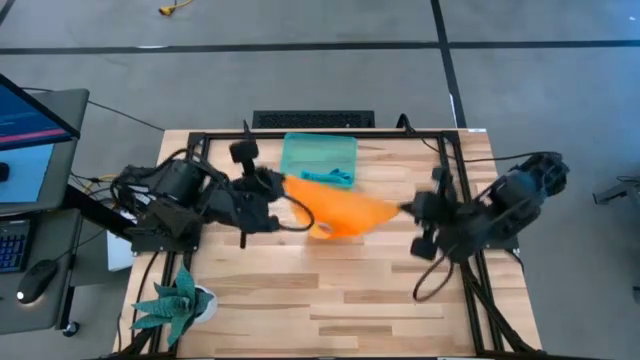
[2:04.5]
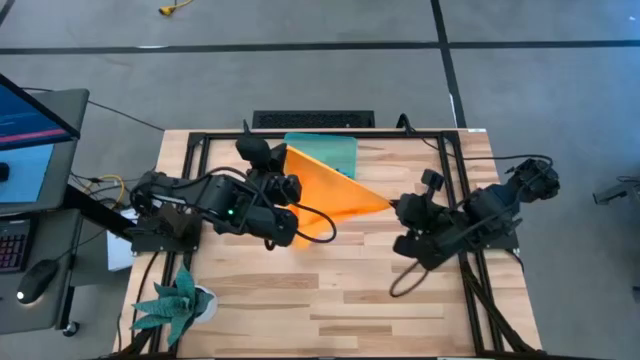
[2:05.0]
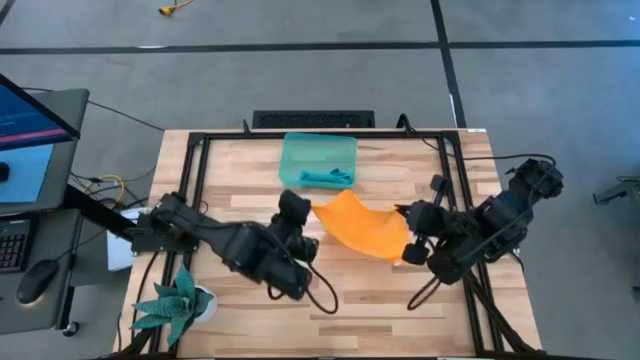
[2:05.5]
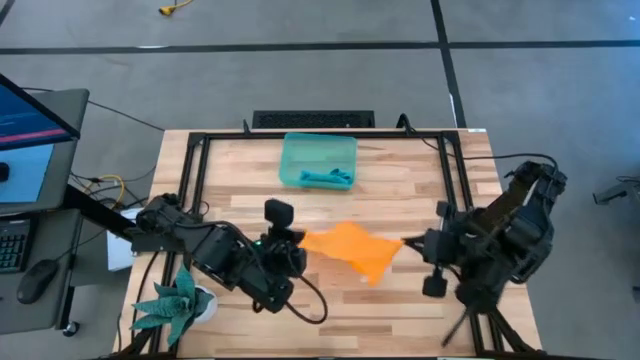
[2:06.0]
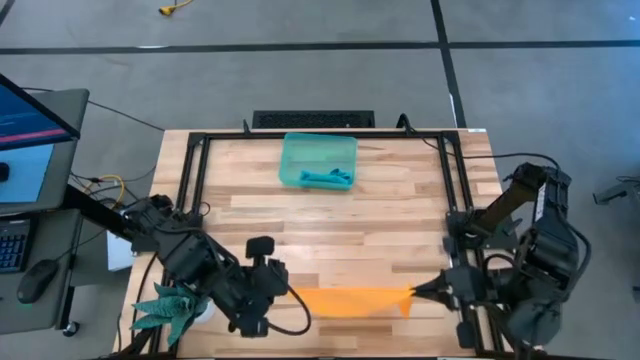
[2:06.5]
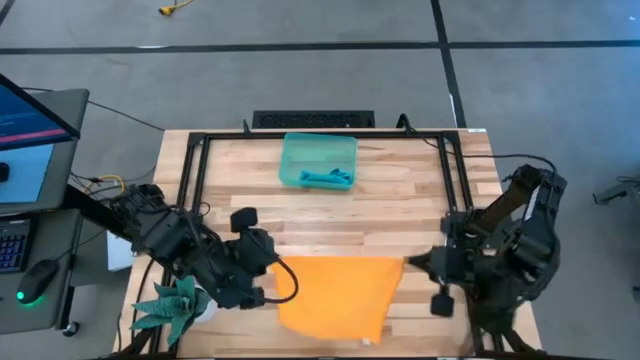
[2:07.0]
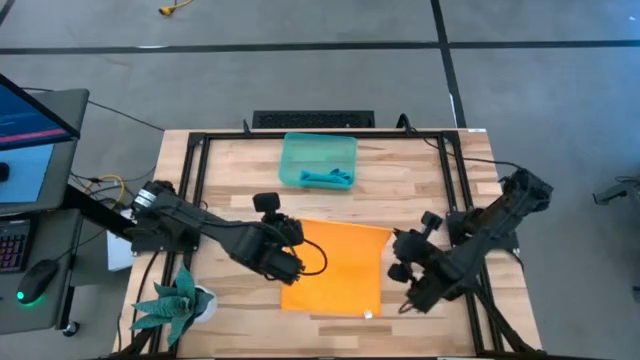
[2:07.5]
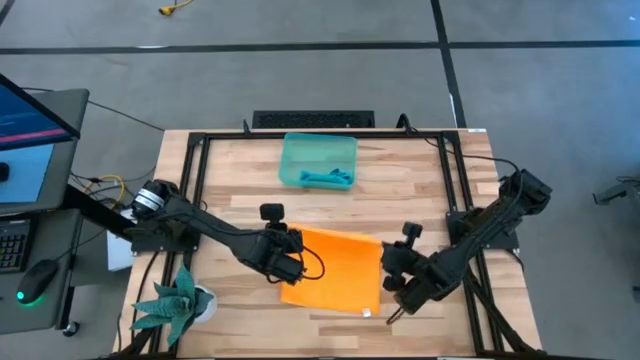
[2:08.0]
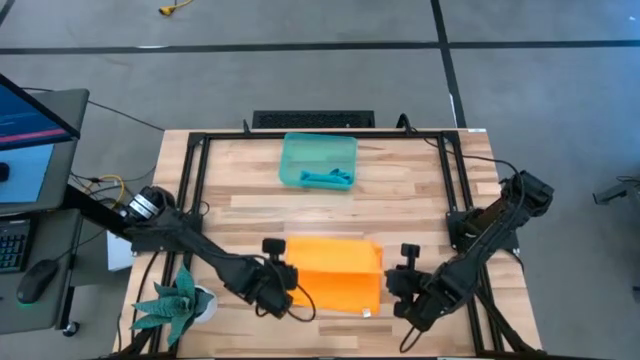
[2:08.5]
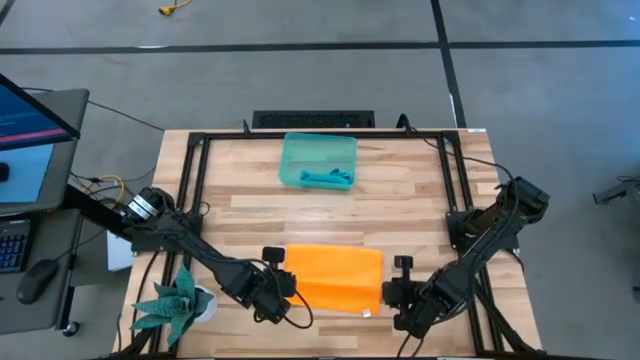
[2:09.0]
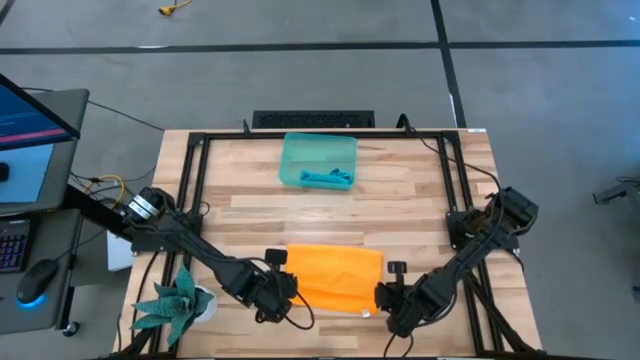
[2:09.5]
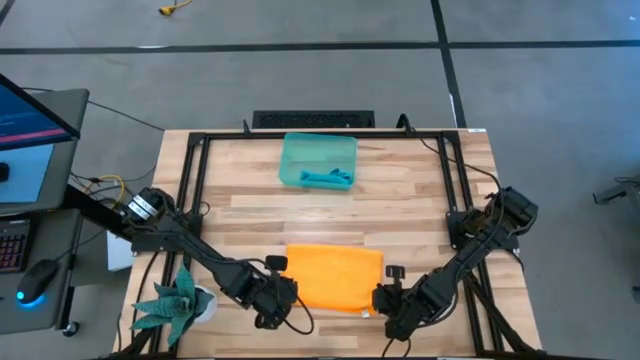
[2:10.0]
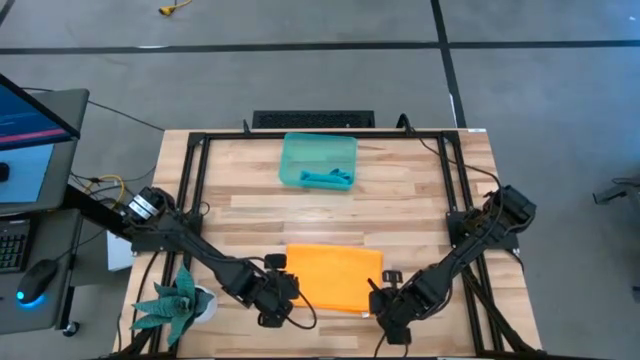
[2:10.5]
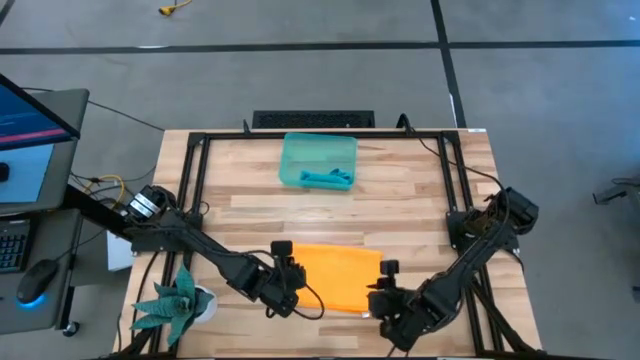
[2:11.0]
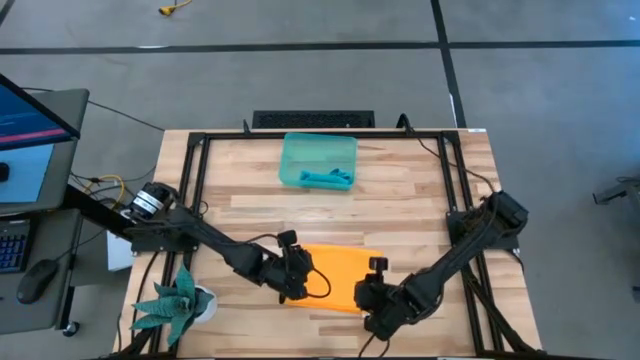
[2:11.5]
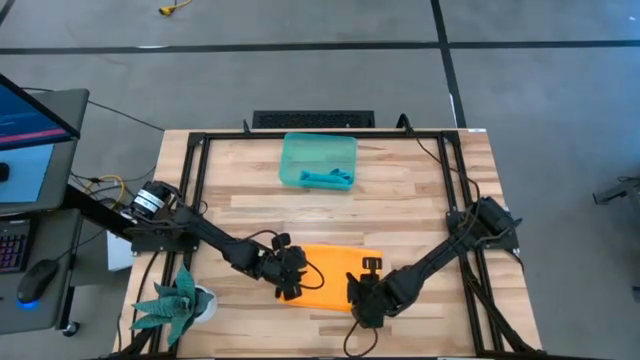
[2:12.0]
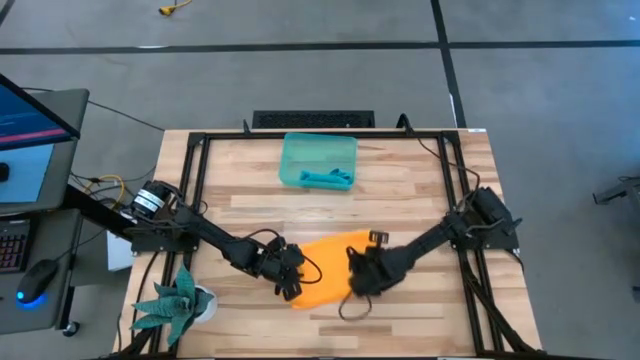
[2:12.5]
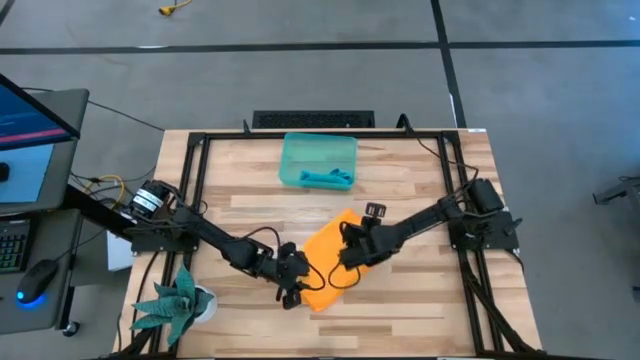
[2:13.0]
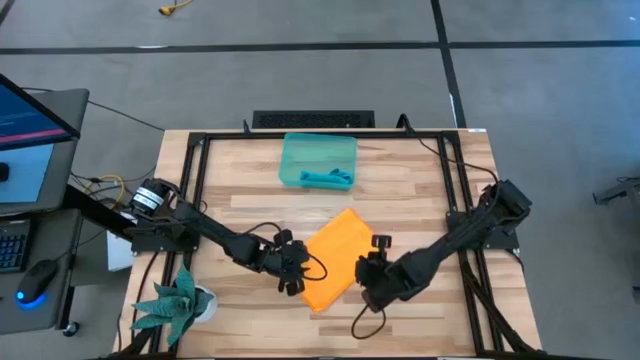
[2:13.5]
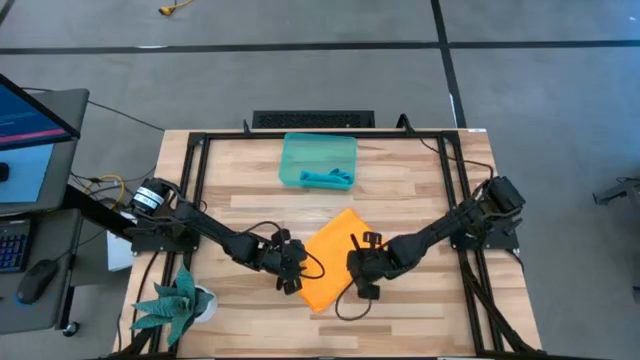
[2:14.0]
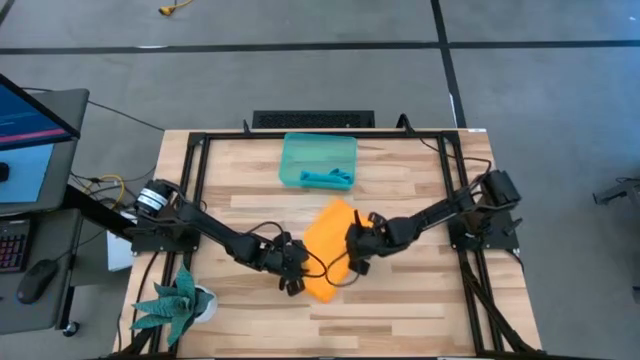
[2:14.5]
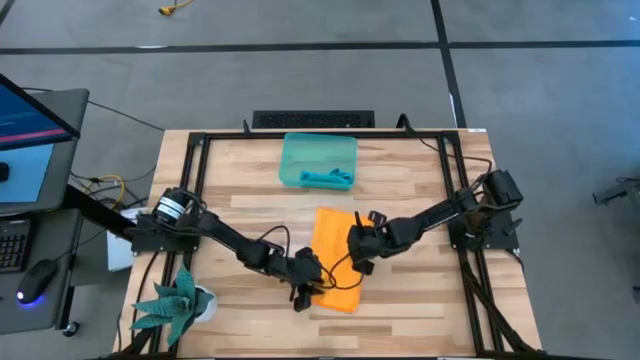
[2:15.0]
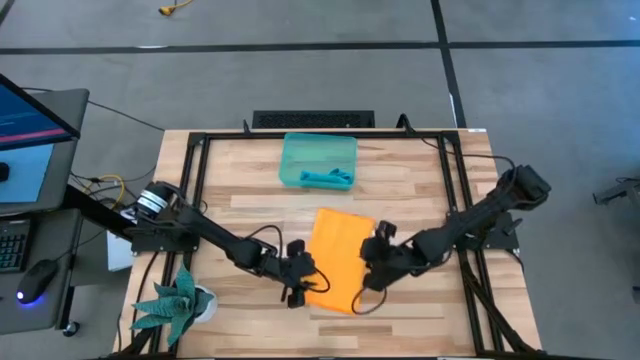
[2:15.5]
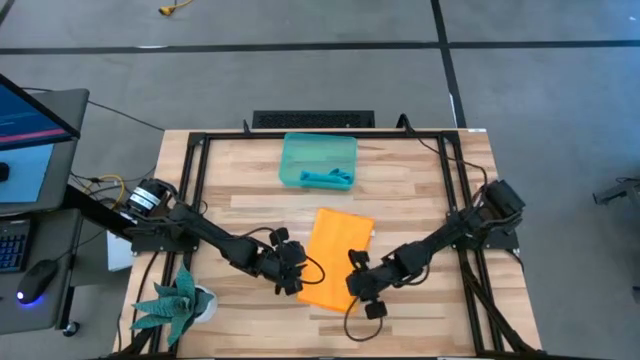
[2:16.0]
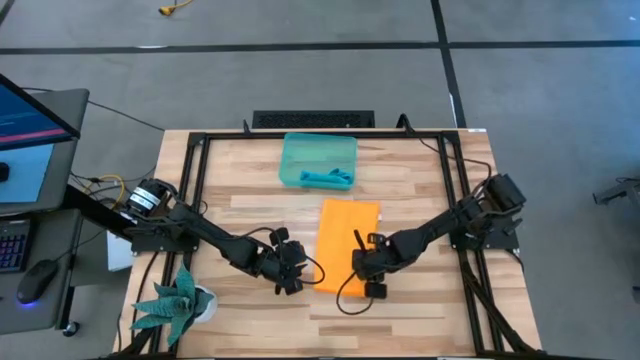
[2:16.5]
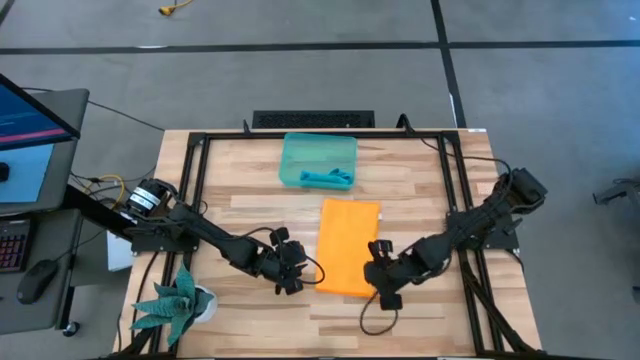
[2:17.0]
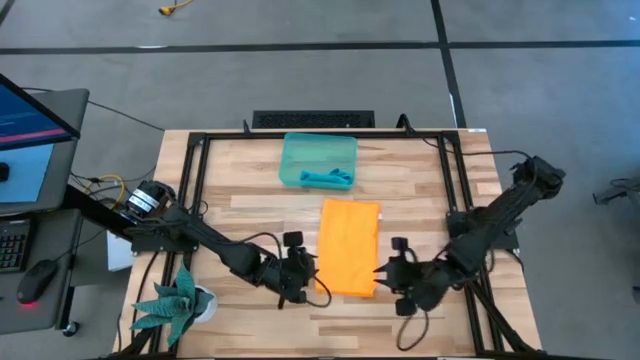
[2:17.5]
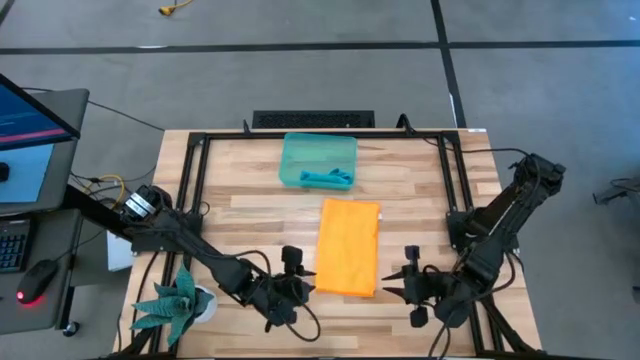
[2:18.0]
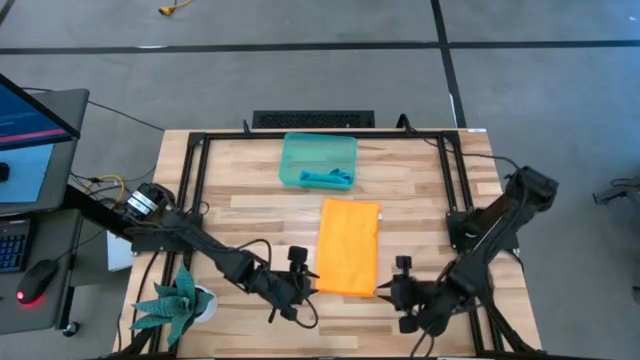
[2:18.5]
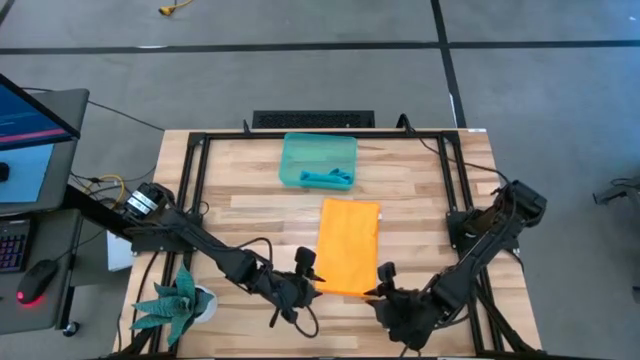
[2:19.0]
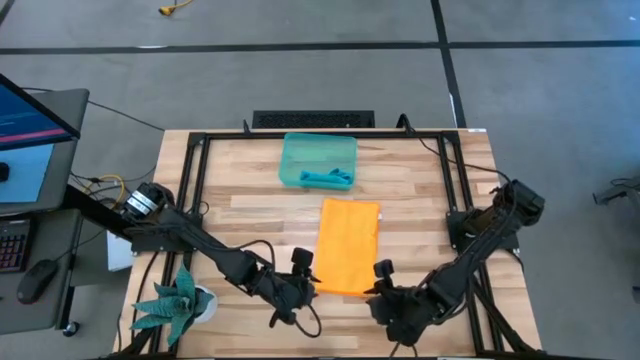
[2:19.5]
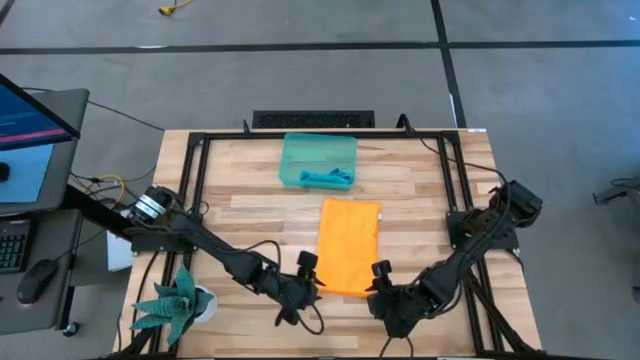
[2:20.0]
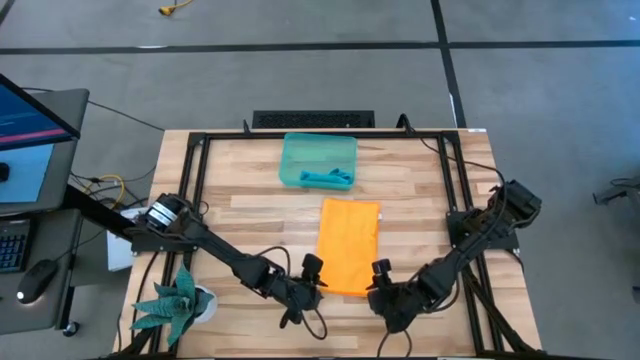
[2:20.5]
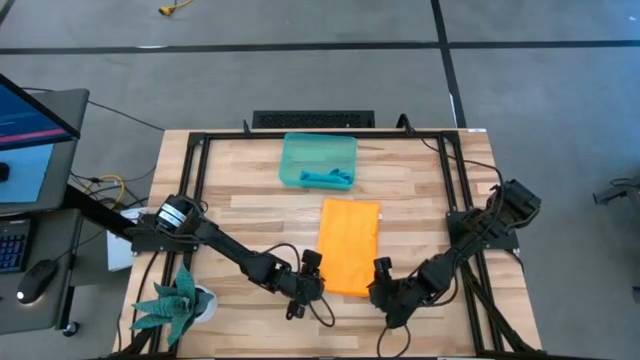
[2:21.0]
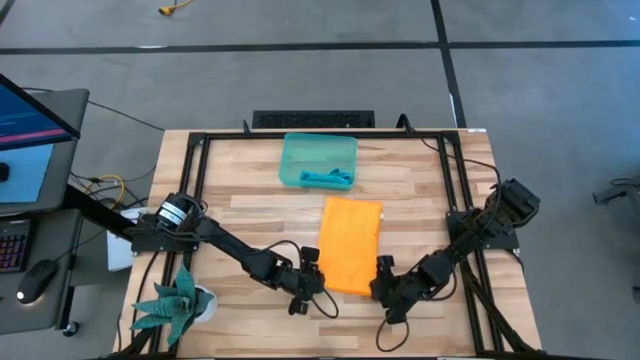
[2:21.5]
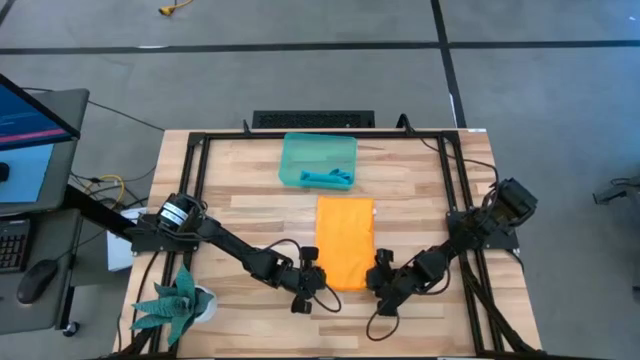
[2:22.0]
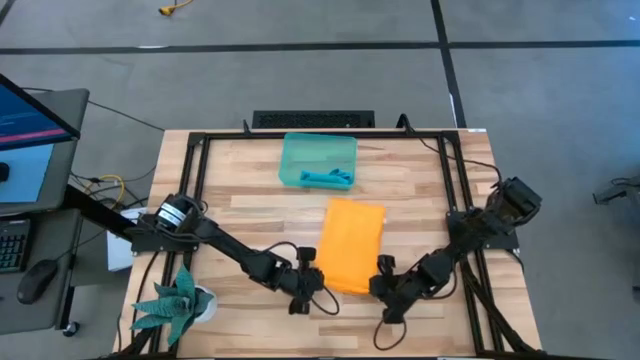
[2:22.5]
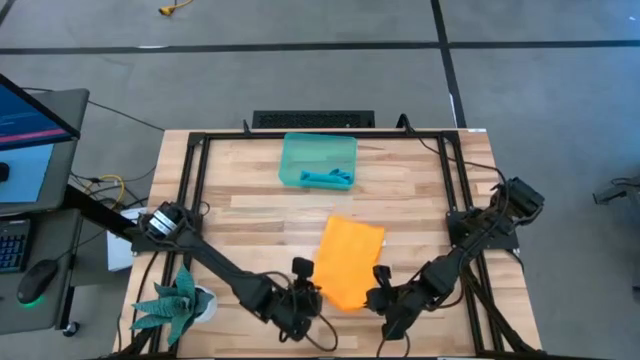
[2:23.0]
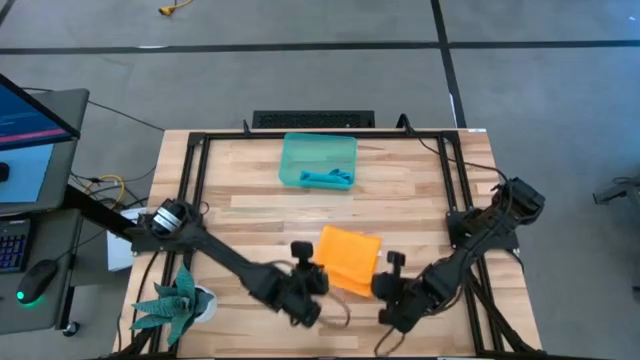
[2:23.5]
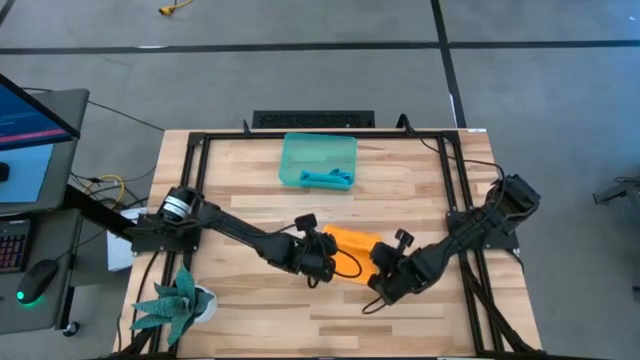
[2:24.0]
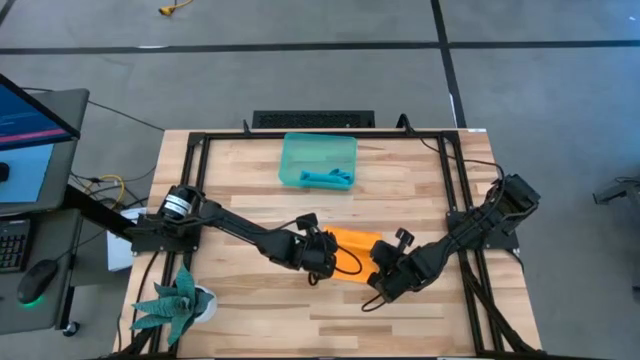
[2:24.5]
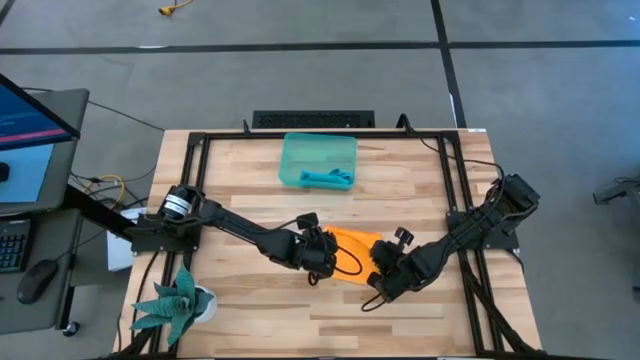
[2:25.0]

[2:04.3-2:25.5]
Task: Roll microfiber towels into tight, uniform cylinder then place into a basket
Fold the yellow microfiber cloth

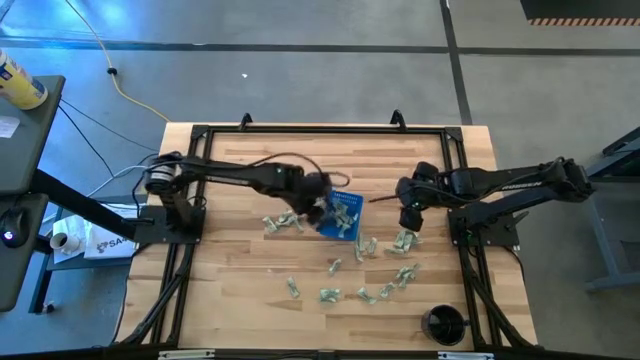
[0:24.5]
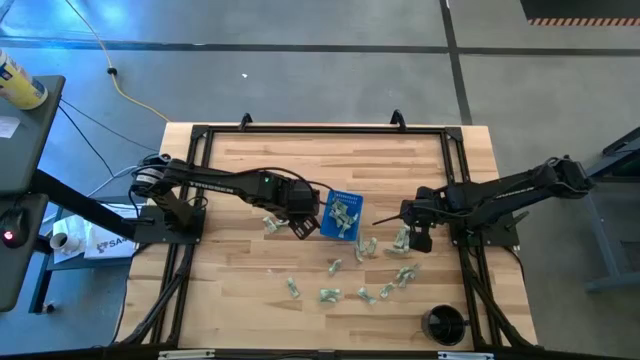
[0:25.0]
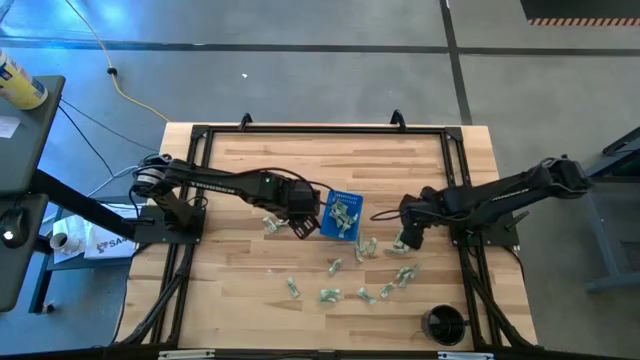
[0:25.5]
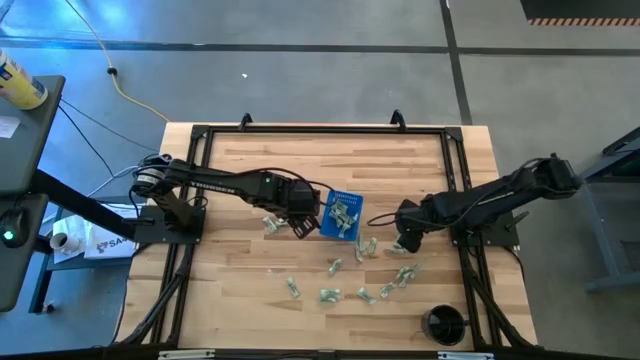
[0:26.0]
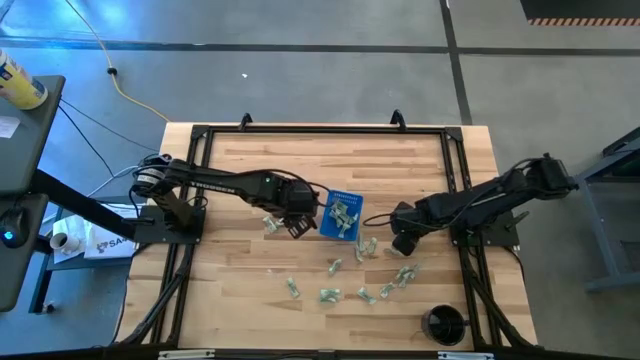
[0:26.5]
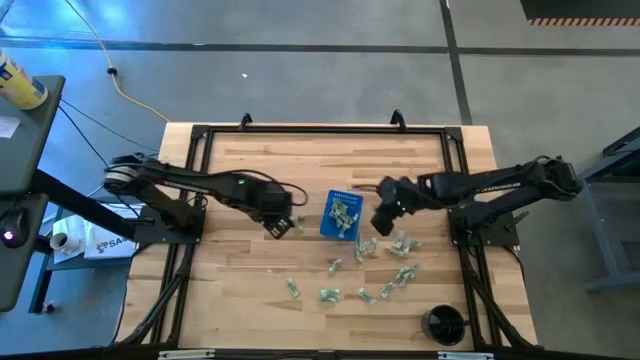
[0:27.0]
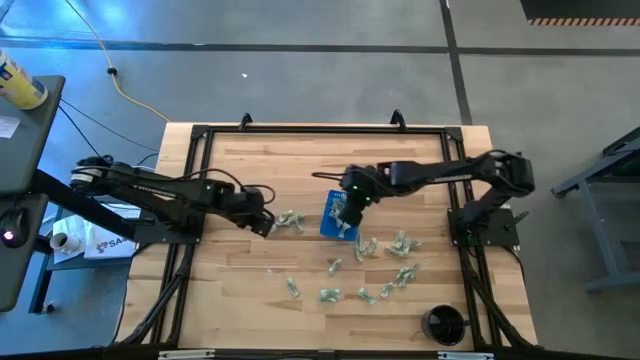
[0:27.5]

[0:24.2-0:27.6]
Task: Pick and place Stevia / Truvia into bins
Put the stevia packet into the blue basket
